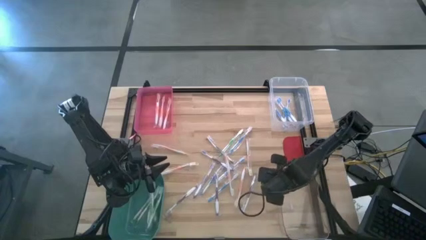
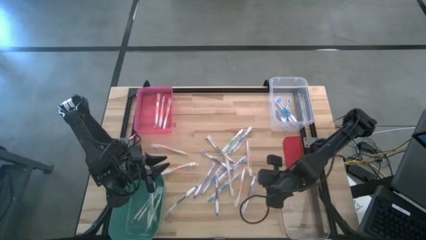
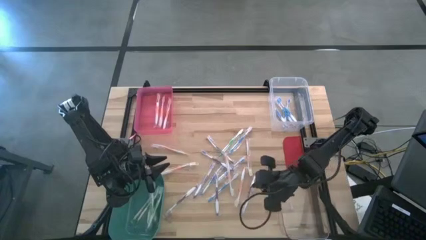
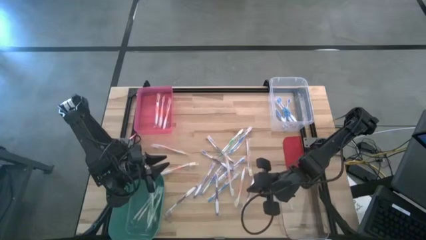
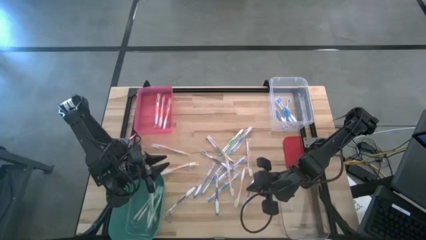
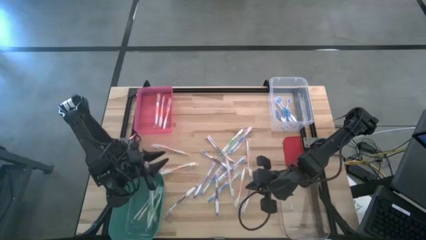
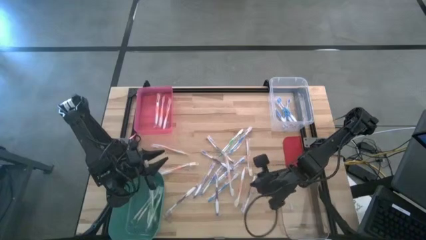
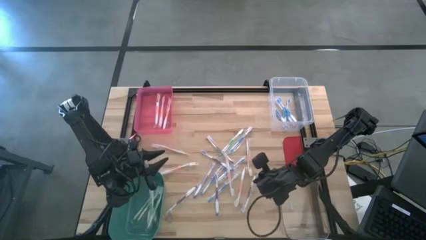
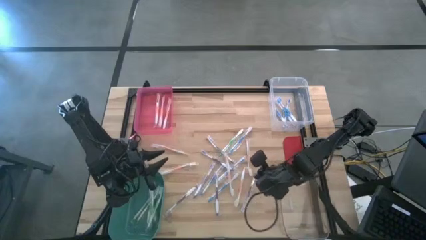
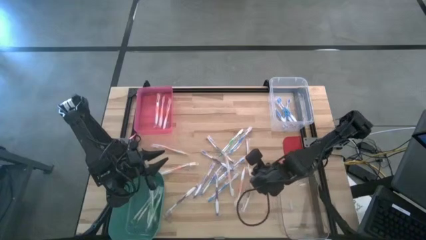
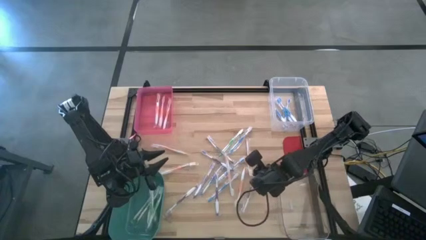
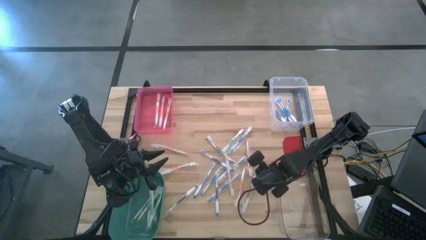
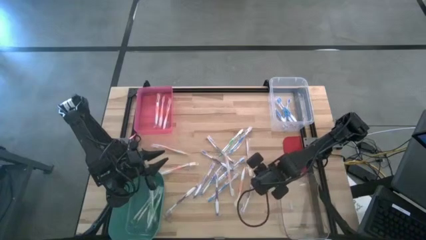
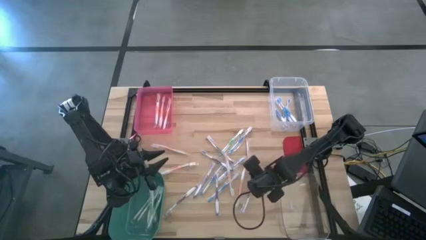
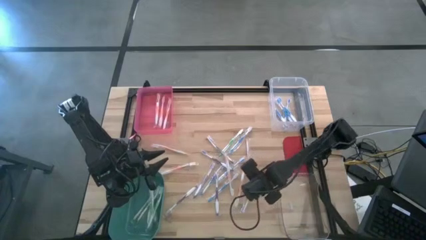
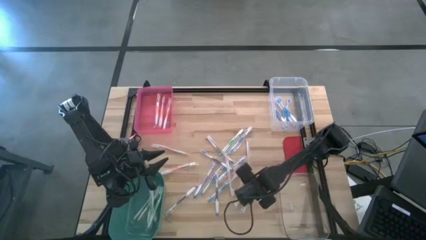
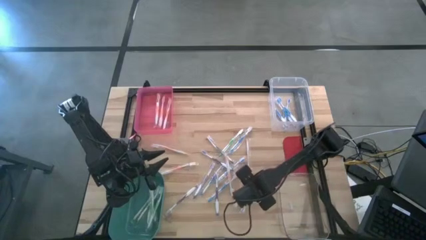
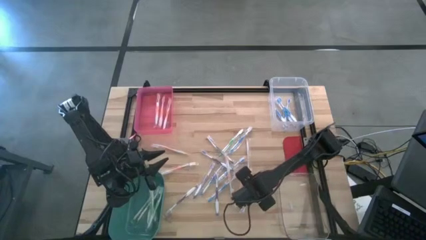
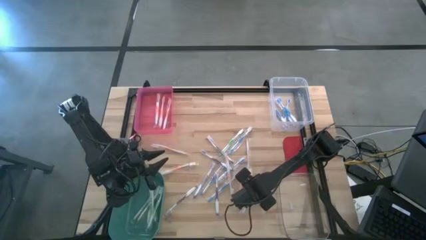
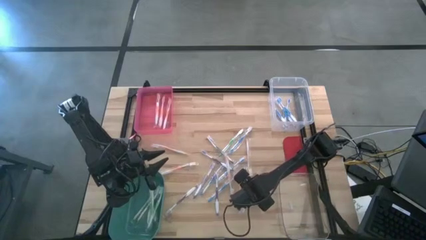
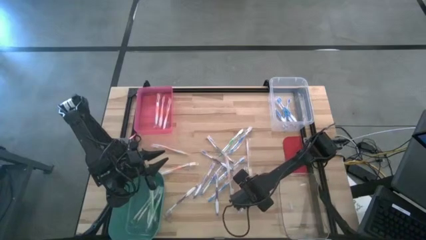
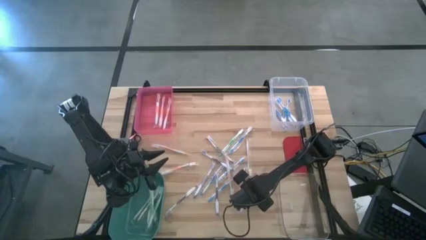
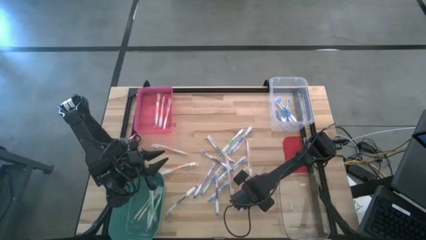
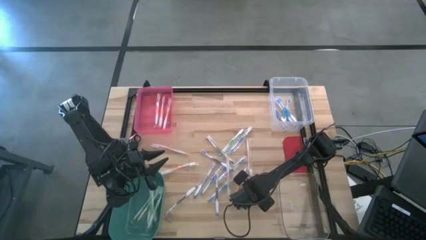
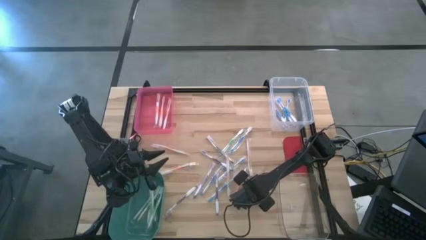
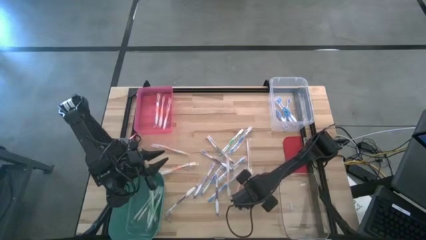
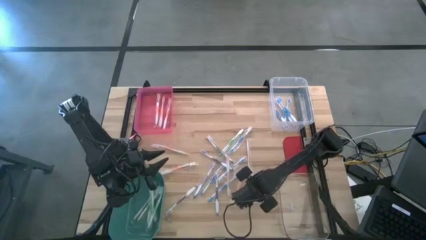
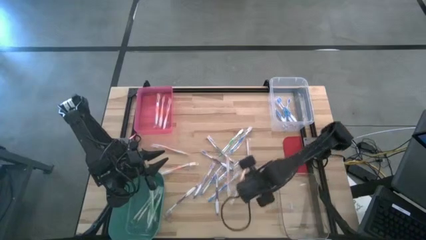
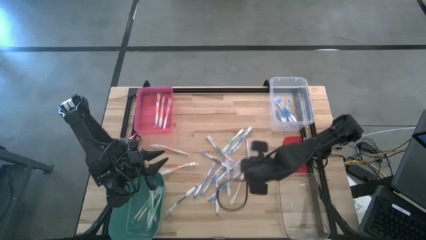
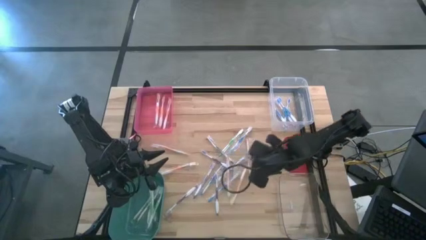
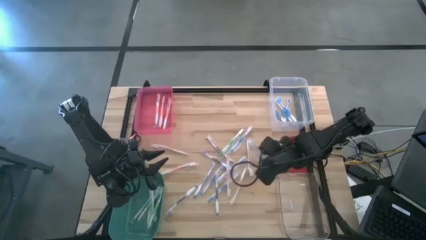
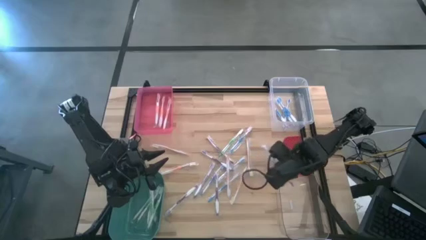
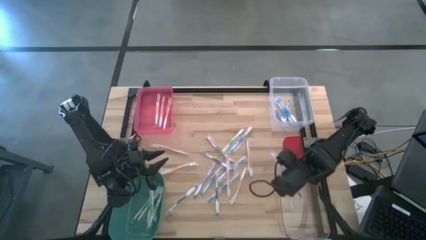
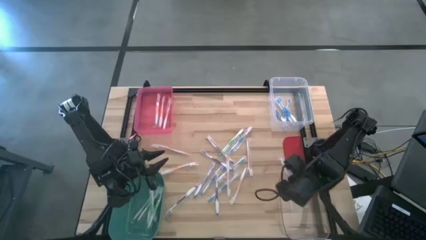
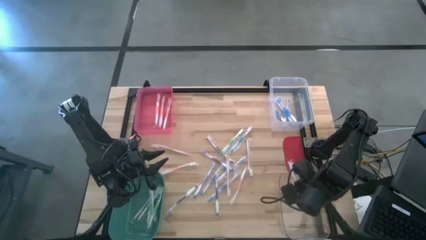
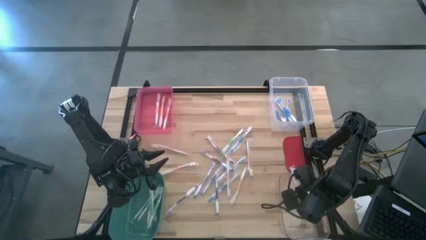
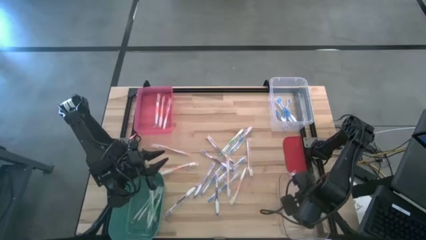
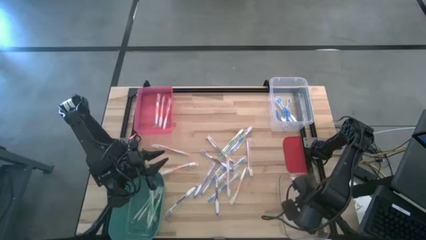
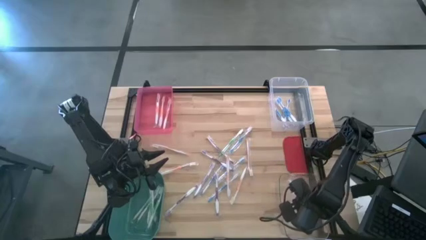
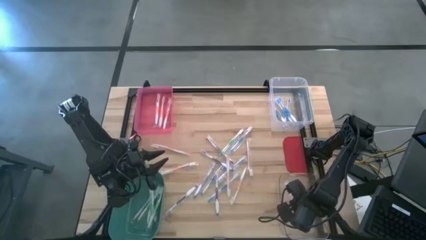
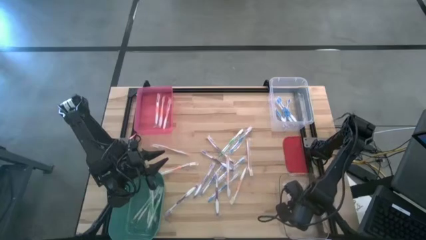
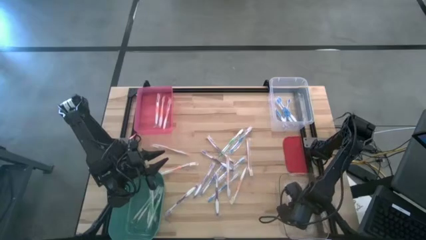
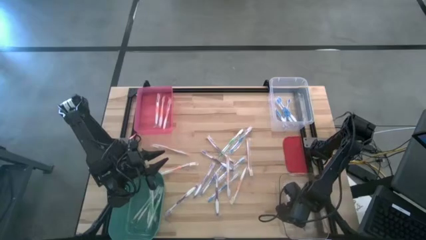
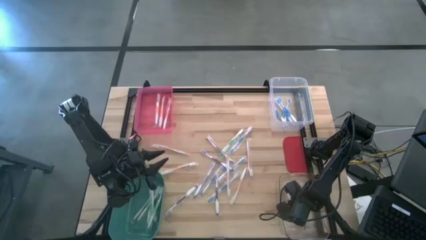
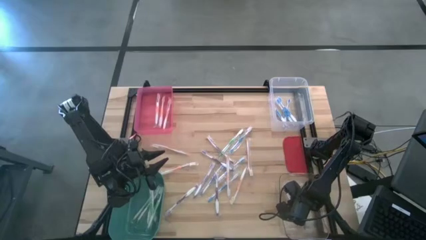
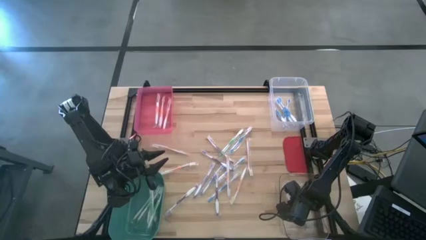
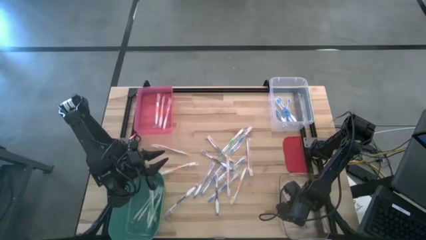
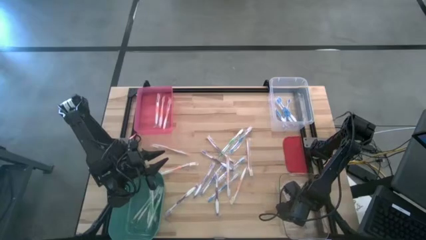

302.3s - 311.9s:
Task: Pick & Place Toothbrushes
Put the violet toothbrush into the bottom transparent bin

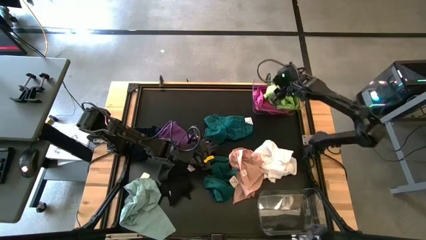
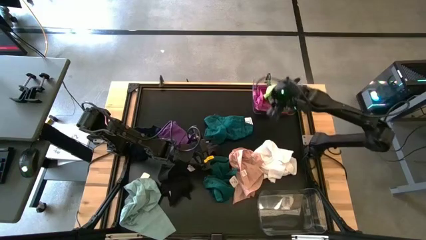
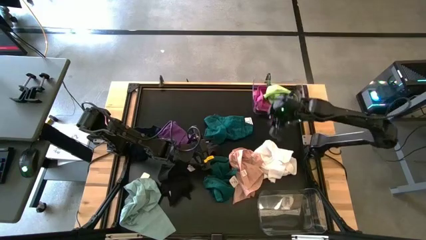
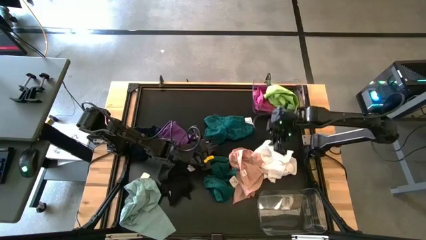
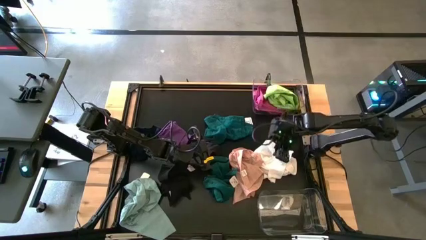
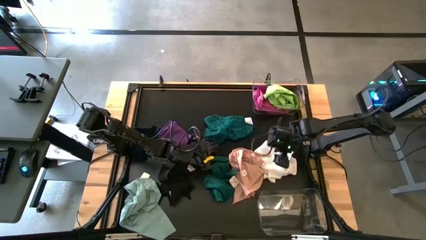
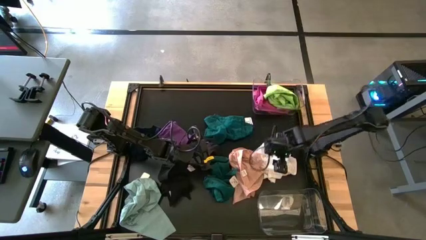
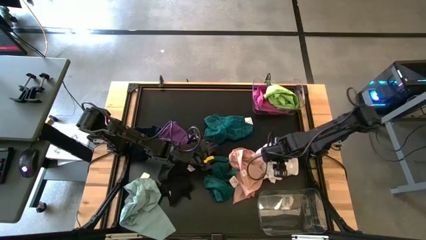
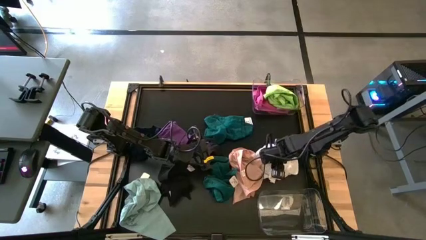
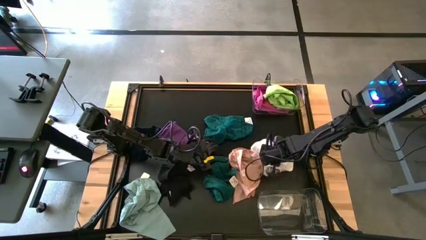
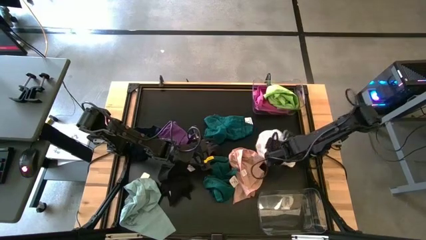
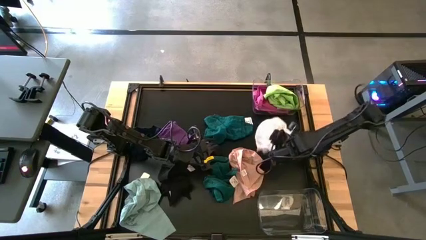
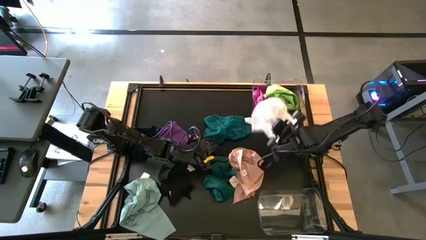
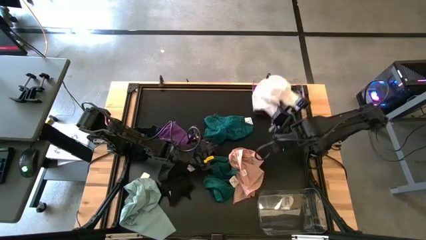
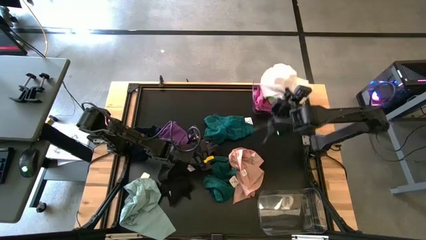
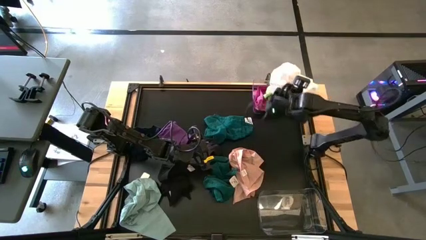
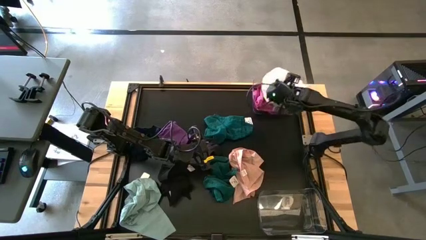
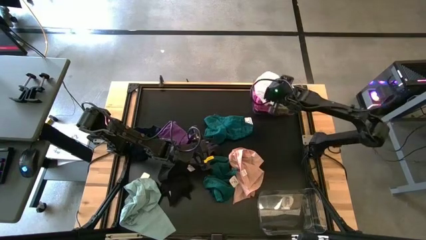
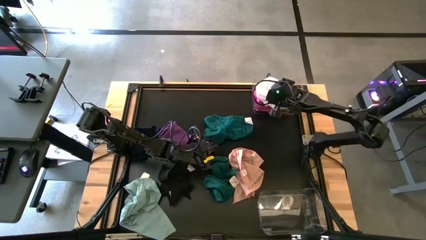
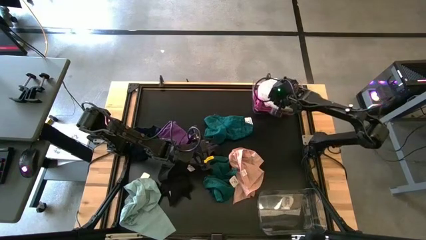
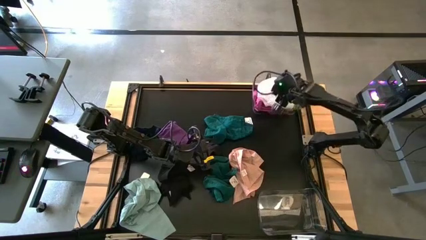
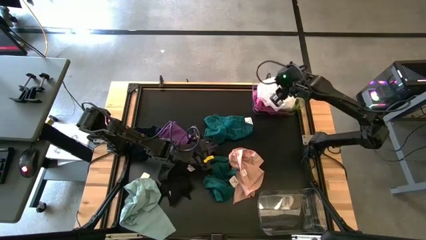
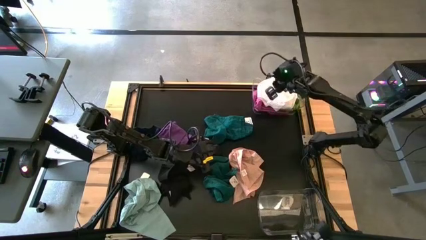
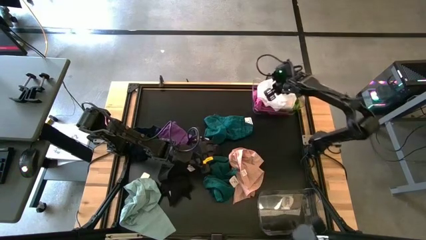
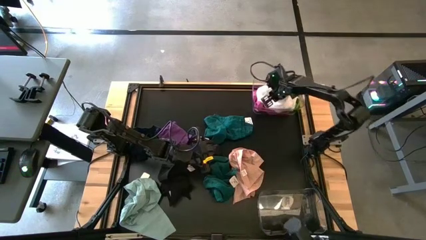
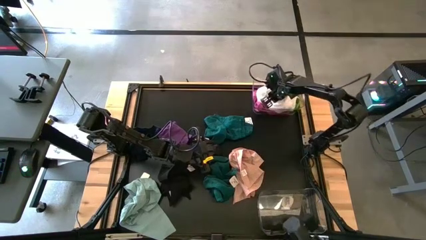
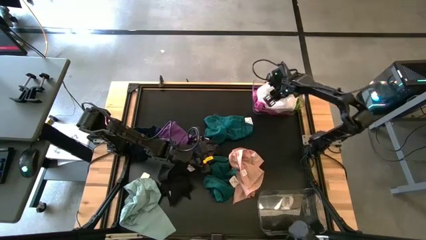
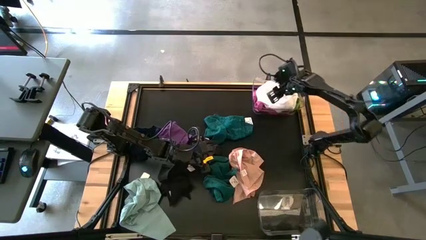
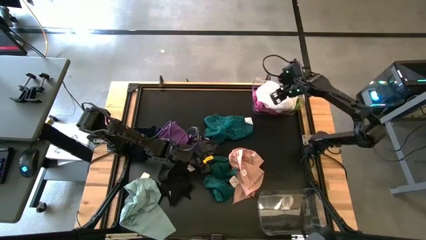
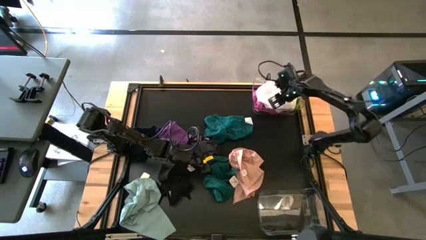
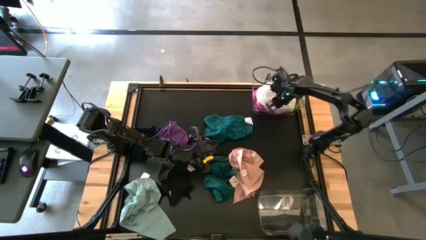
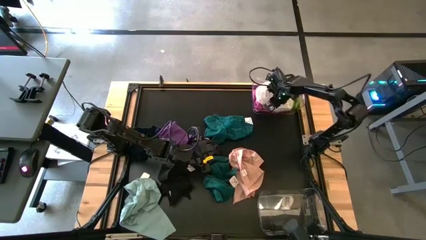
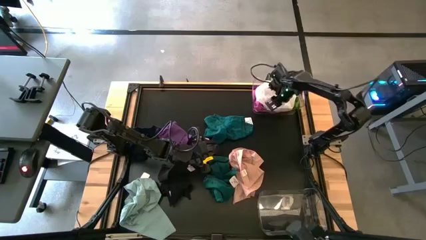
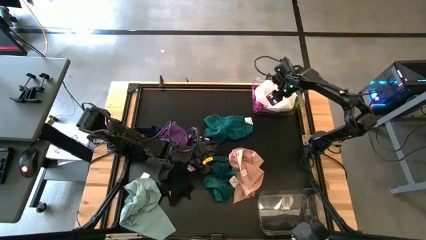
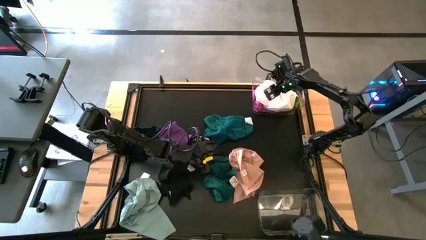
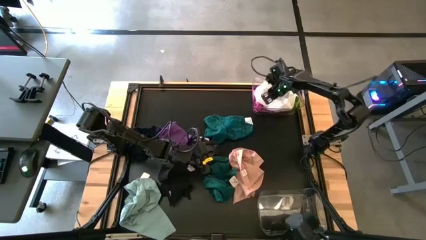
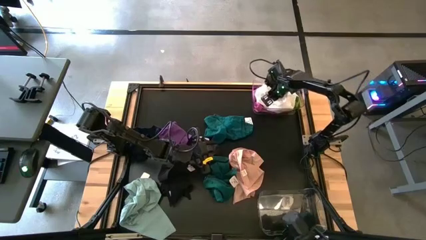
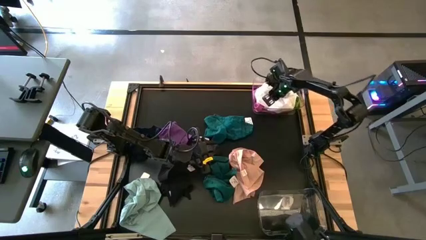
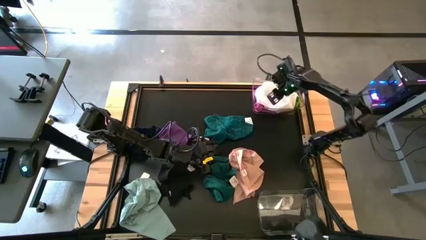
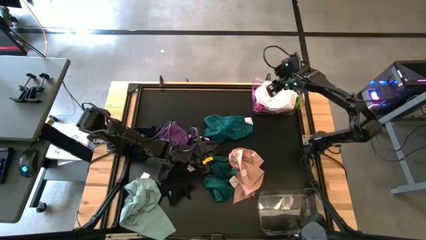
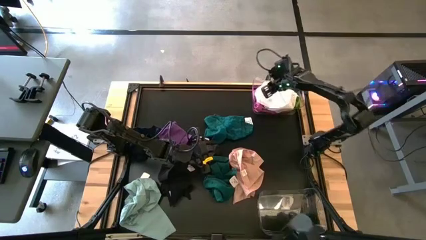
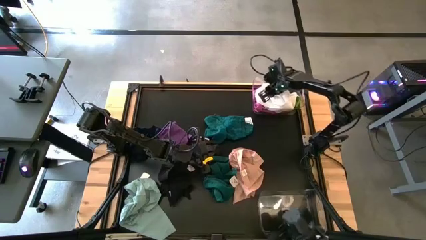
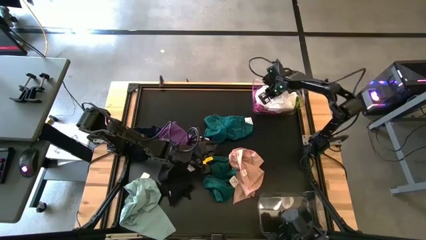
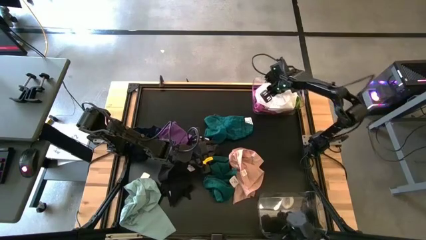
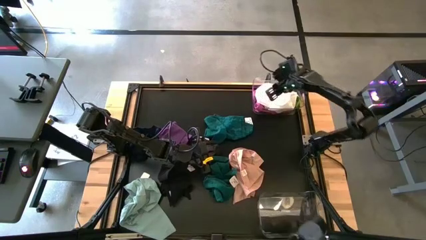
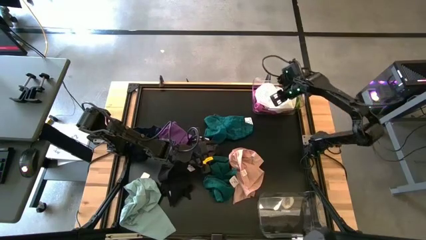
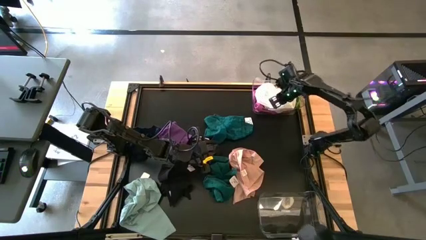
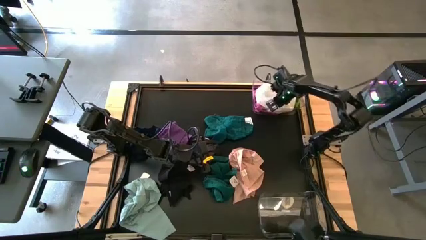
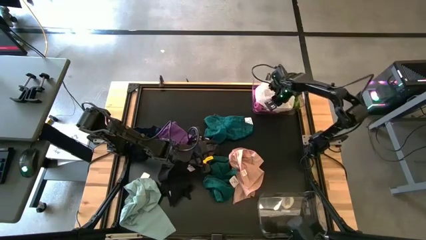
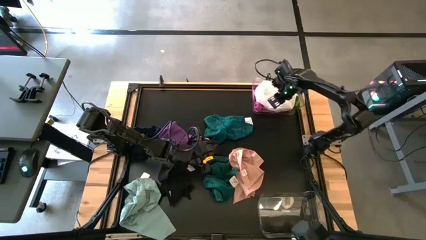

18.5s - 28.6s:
Task: Sort towels by color in basket
Put the white towel into the top transparent bin
